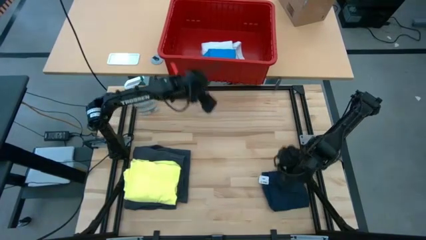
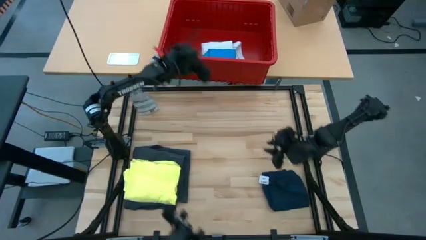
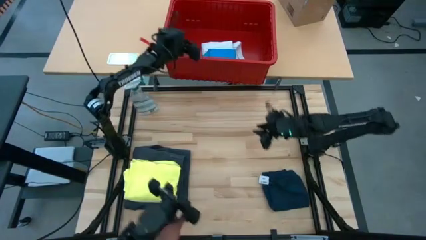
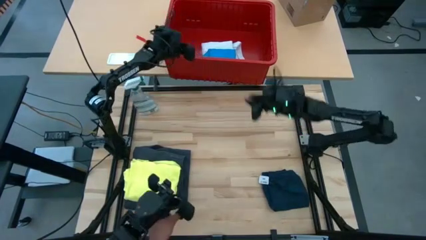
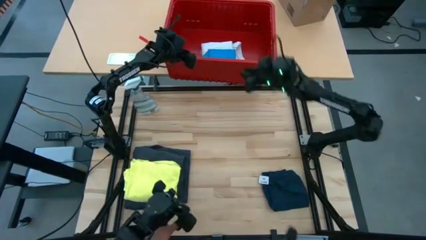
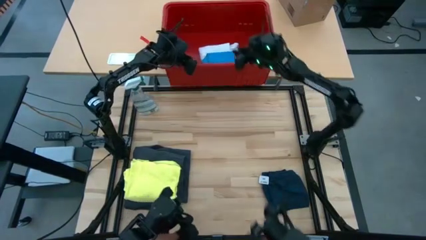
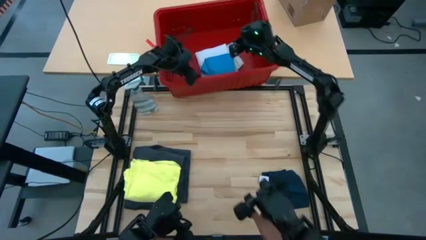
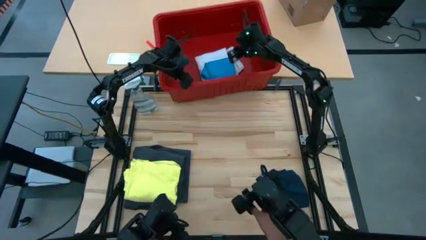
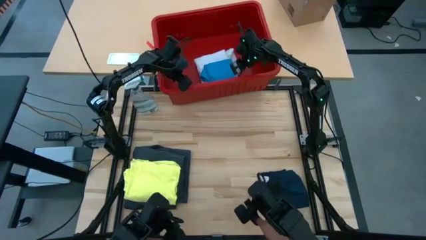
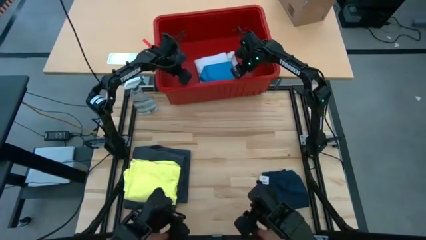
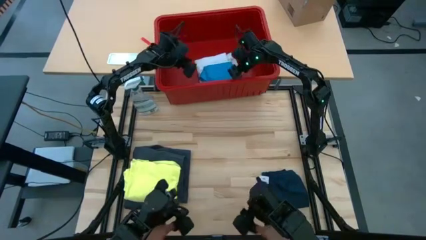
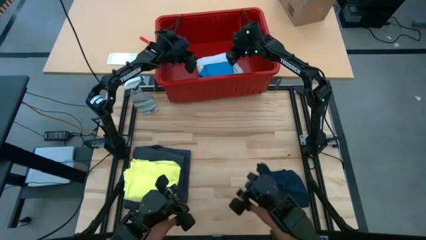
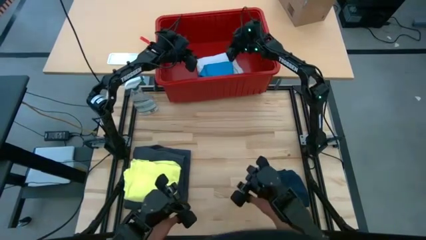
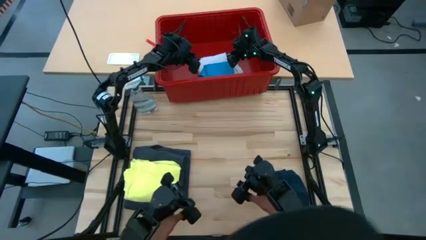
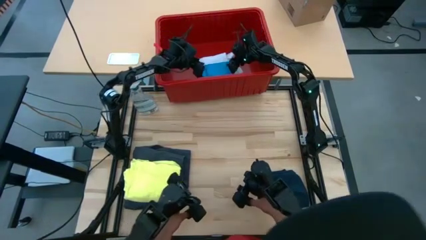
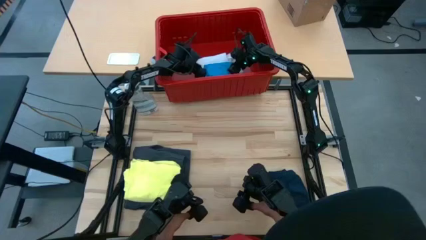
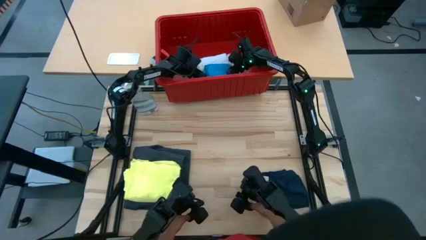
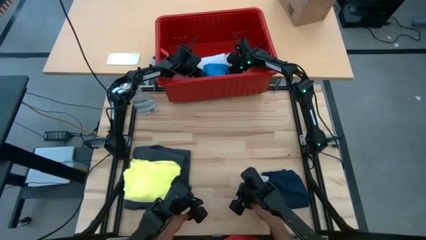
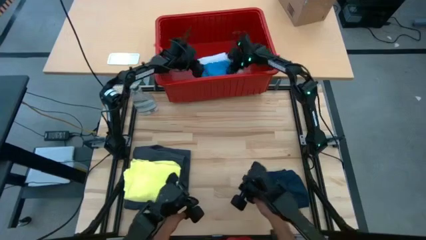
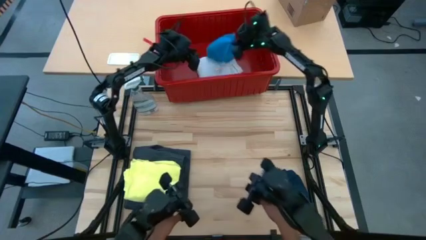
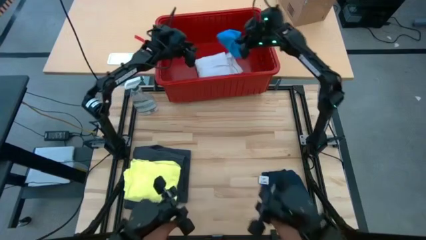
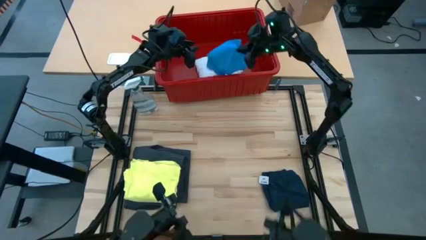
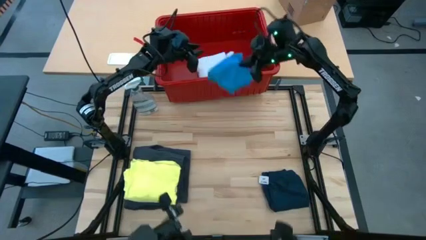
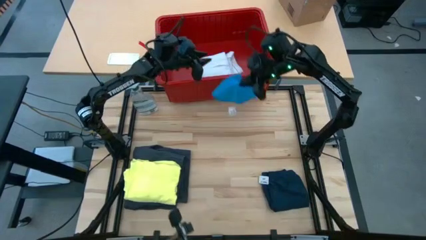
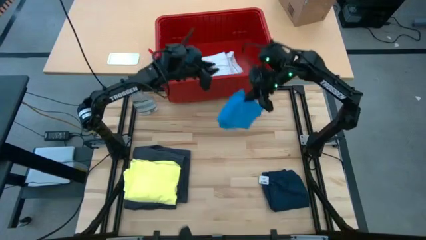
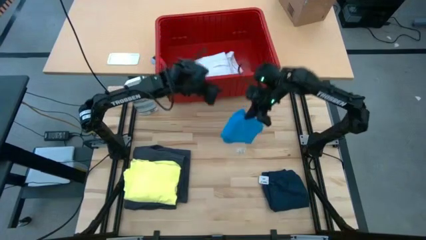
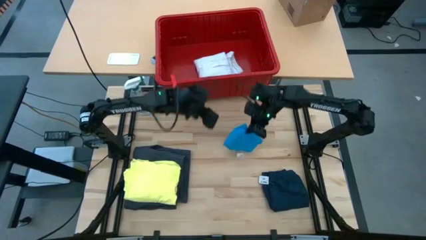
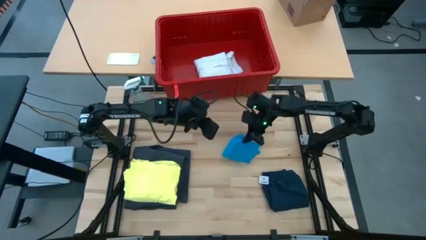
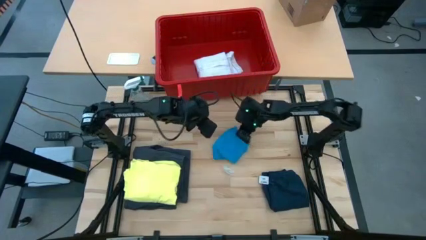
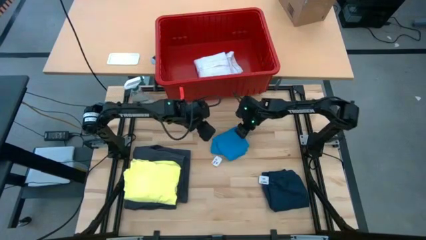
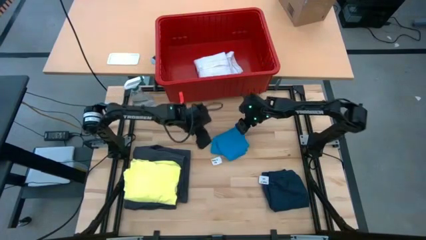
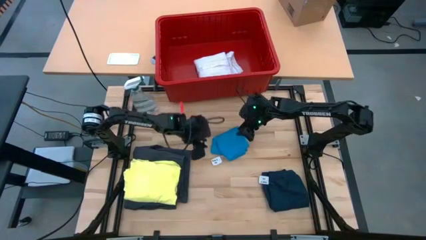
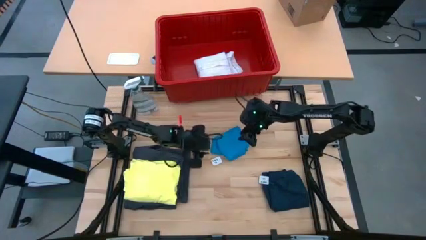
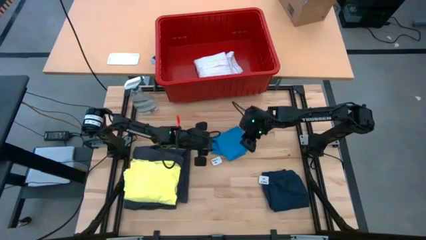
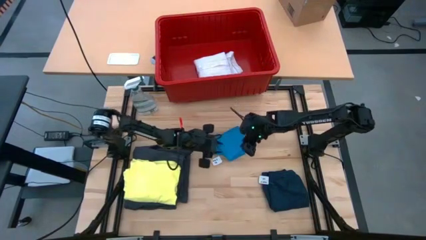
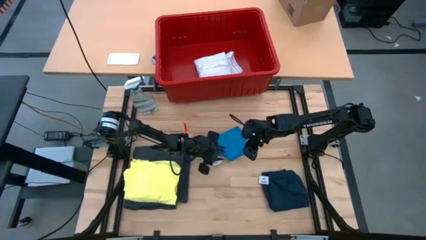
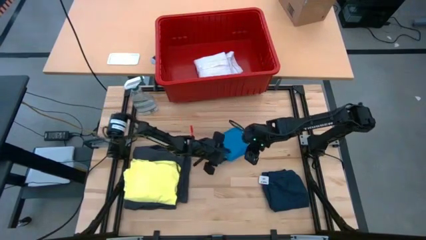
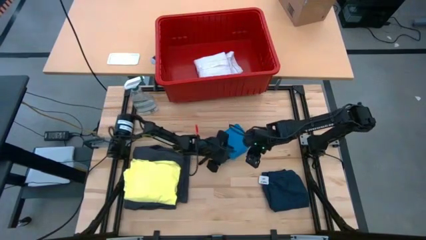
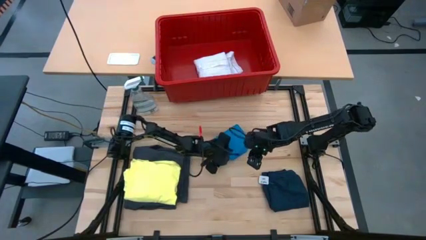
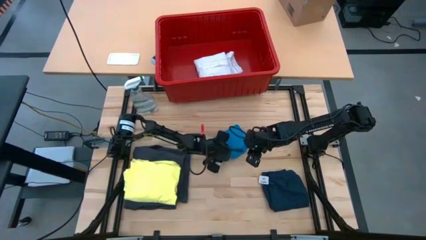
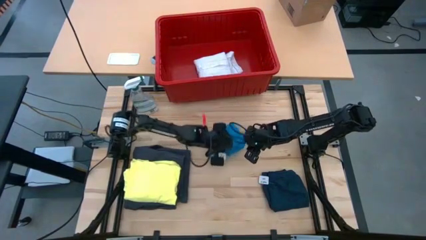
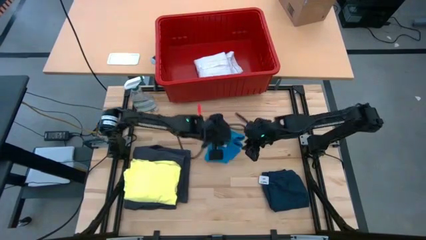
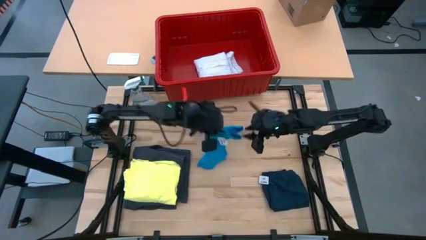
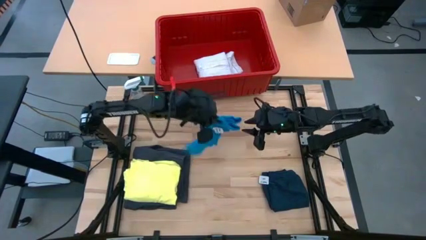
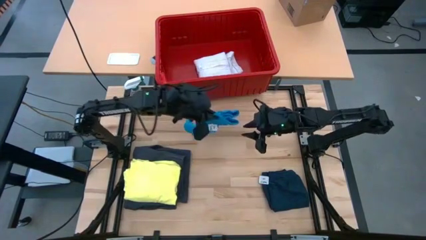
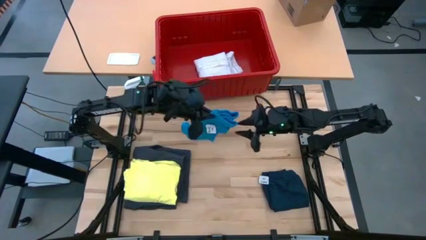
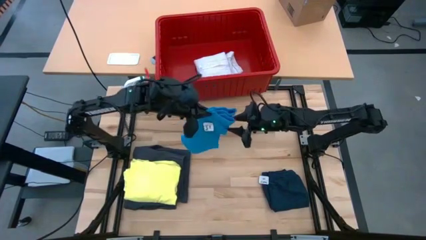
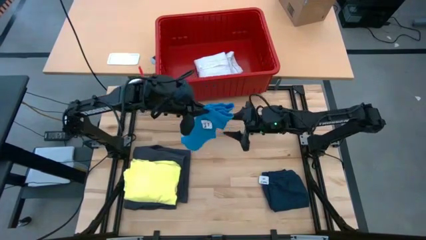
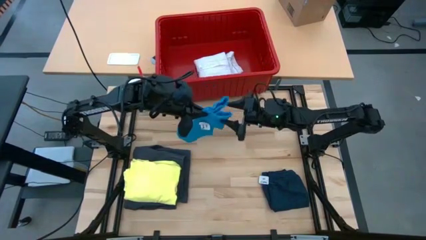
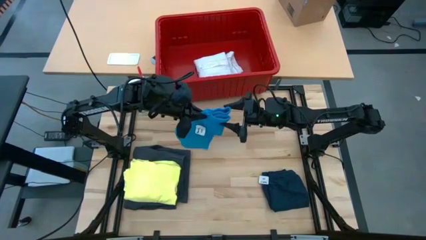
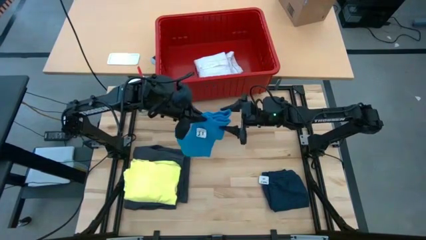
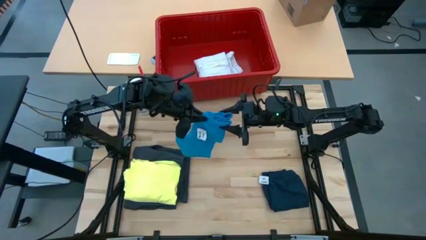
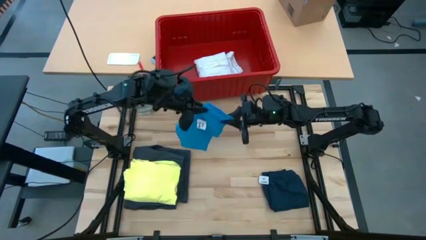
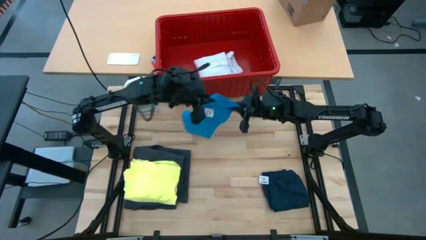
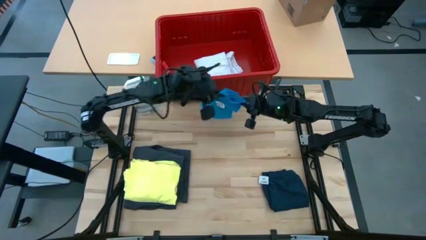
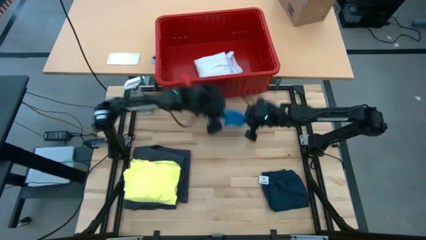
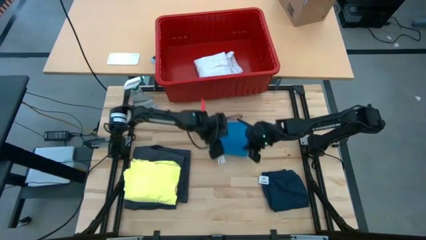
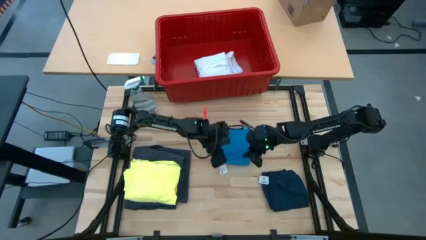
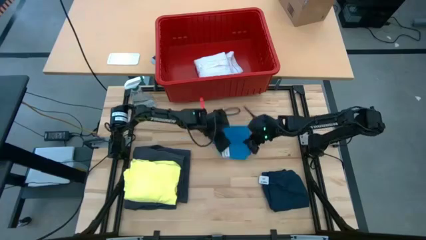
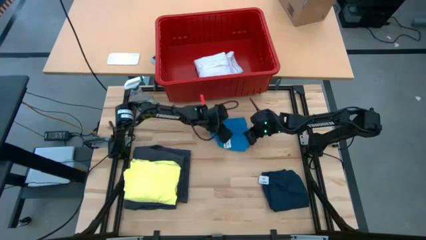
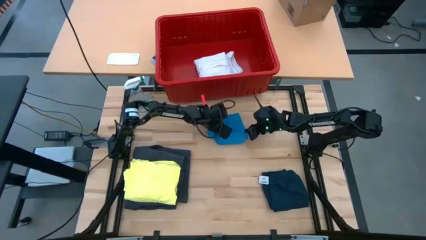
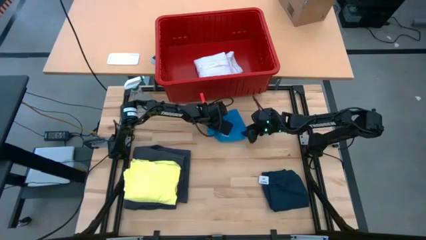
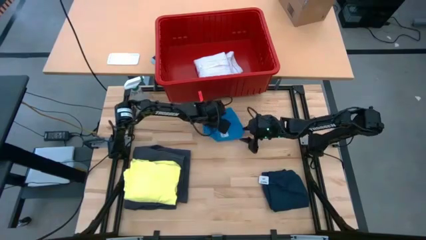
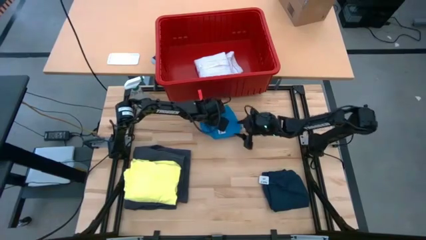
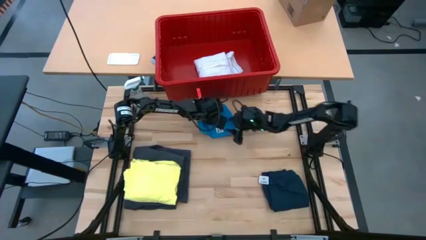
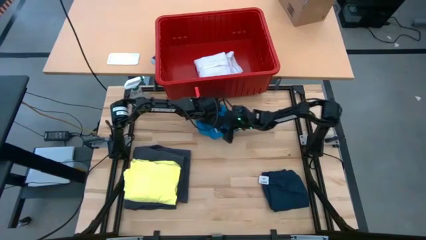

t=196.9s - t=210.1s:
Task: Fold Laundry from Bin
Fold the light blue short

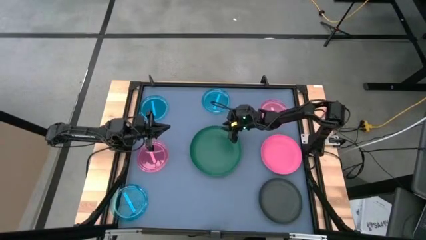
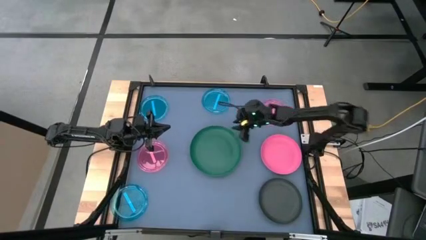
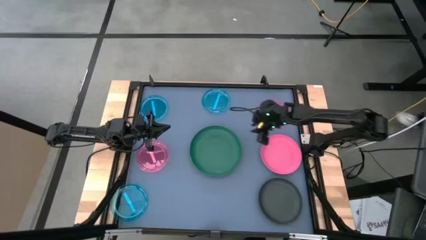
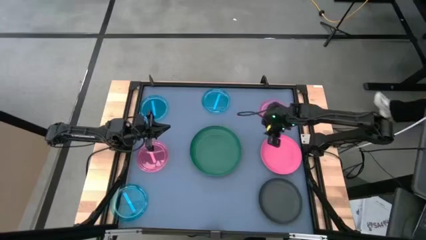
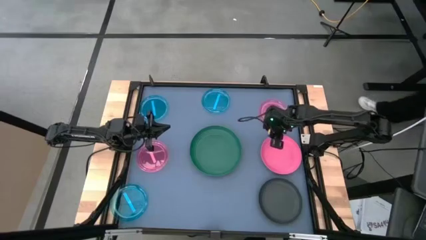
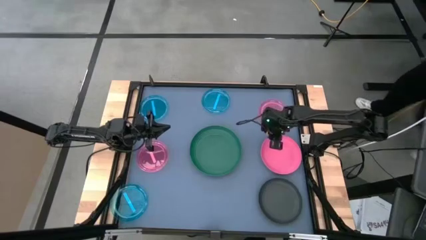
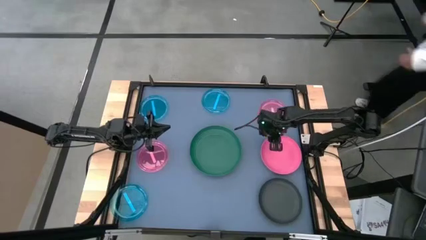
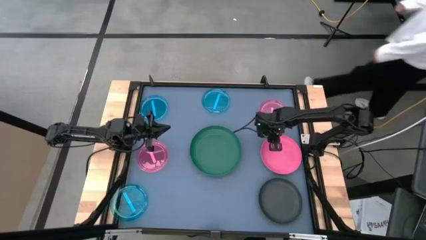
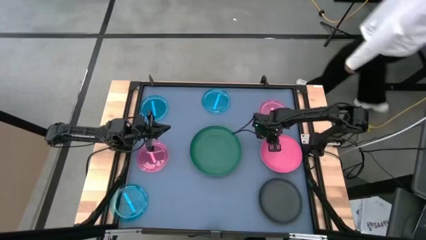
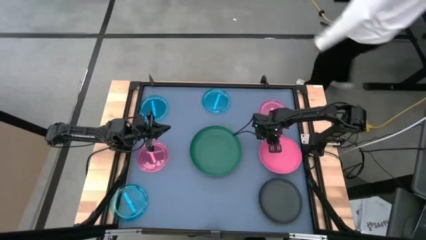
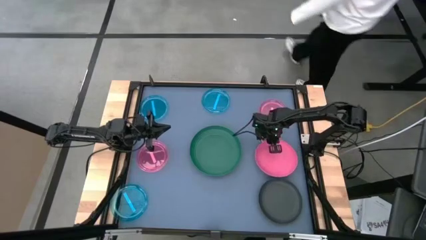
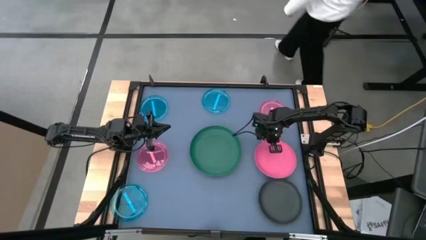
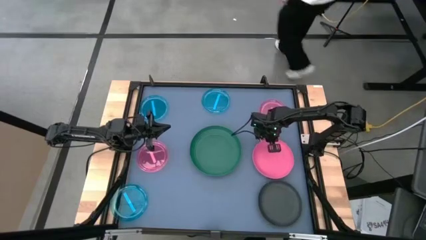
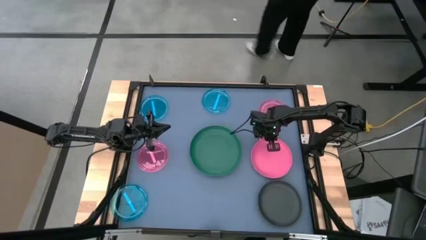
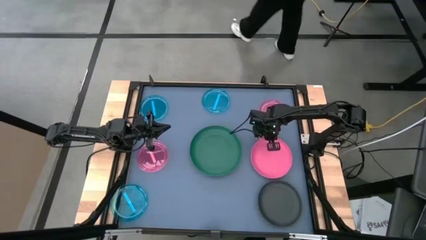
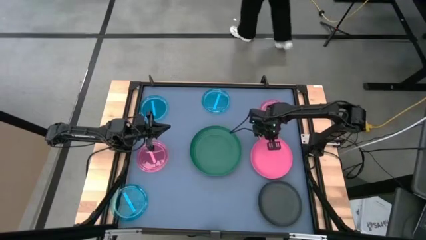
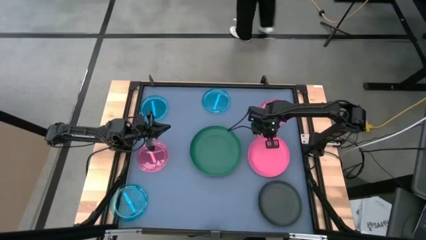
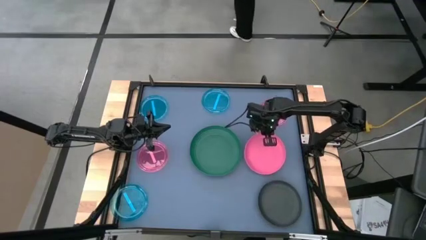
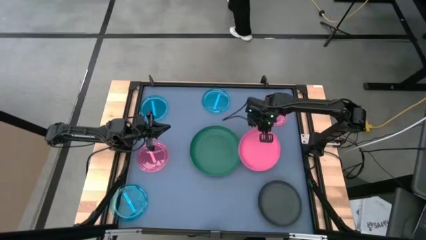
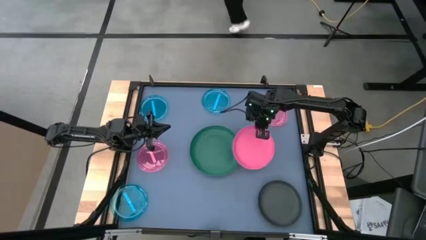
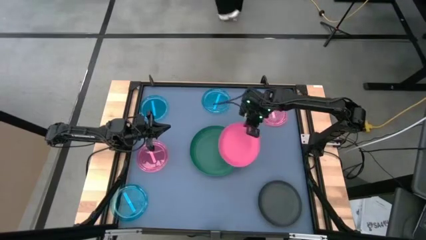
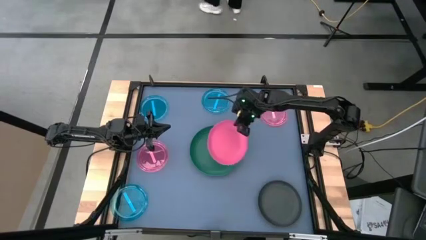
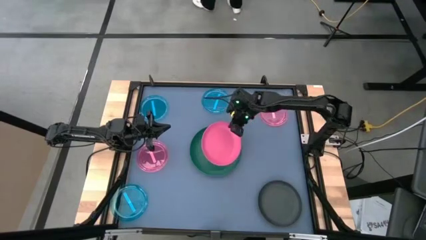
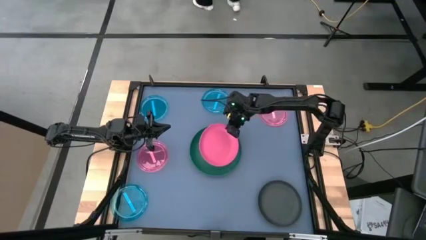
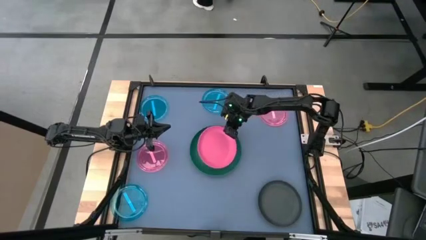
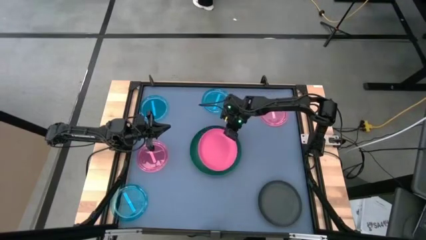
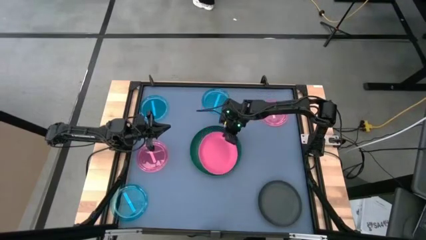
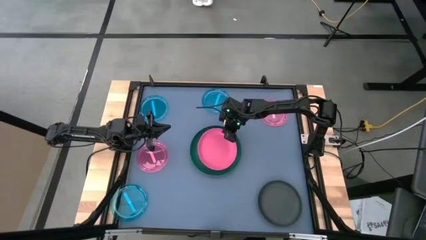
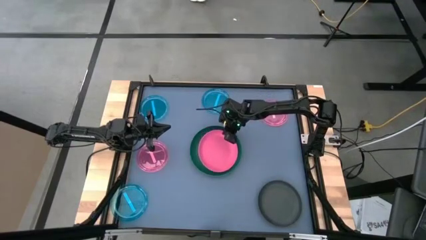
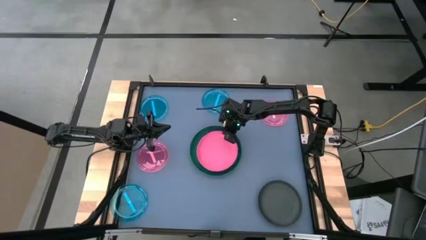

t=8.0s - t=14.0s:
Task: Stack plastic plates
Stack the pink plate on top of the green plate
